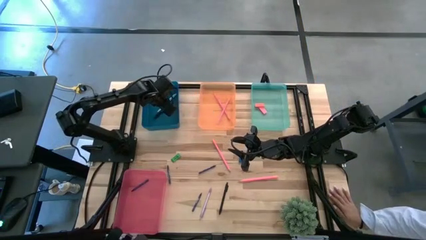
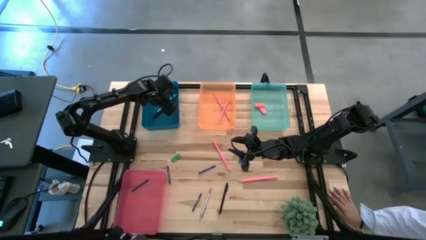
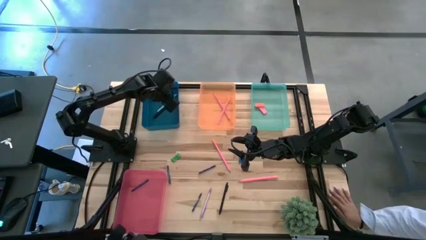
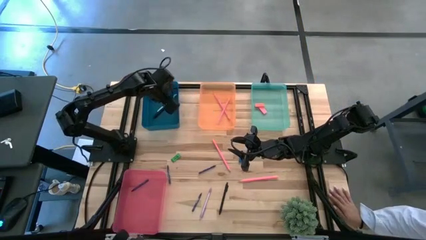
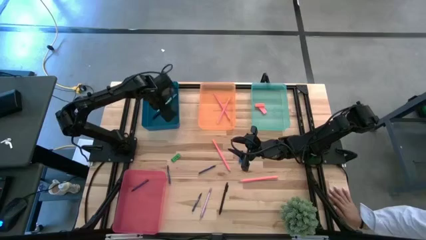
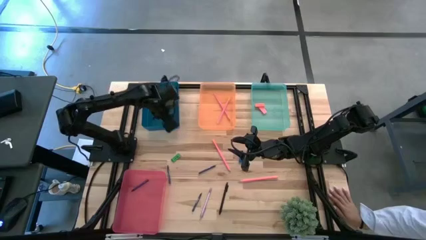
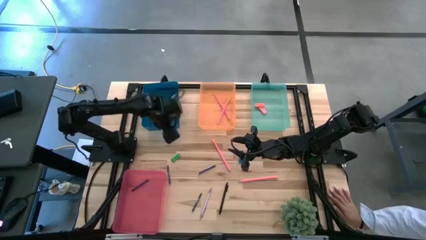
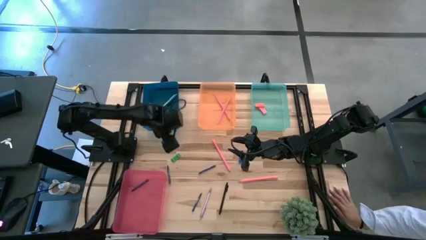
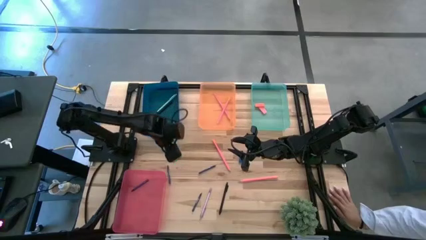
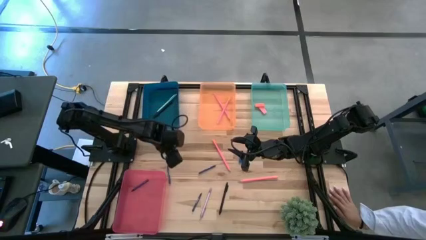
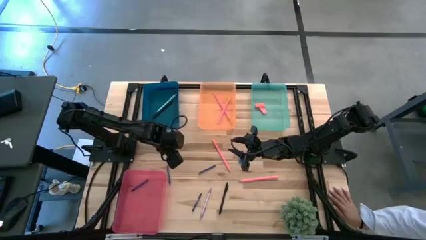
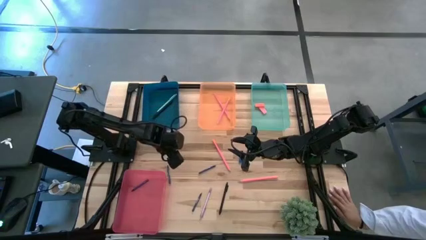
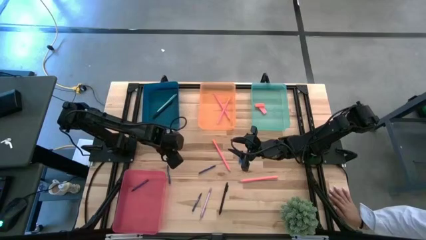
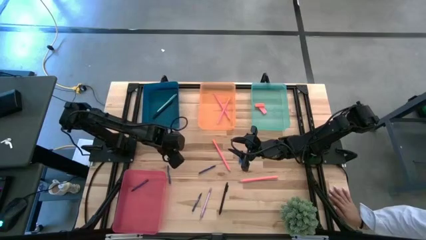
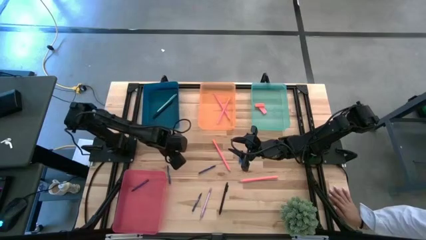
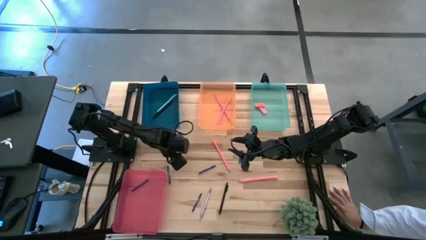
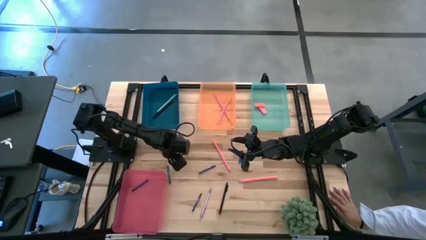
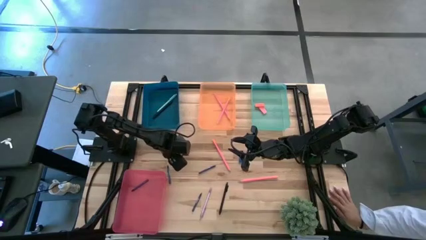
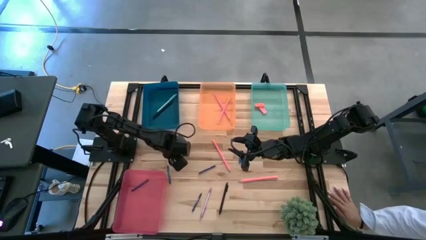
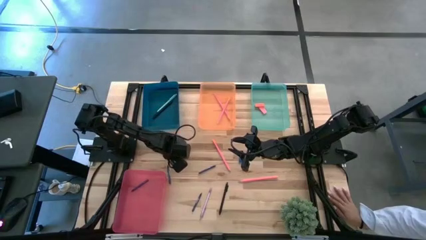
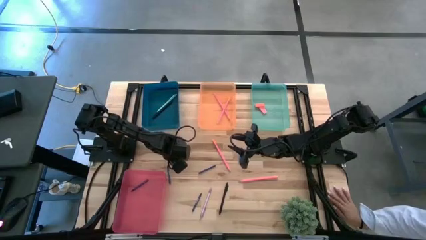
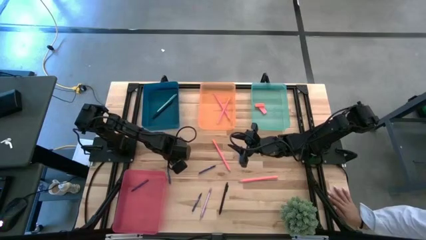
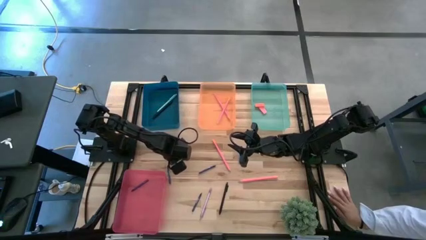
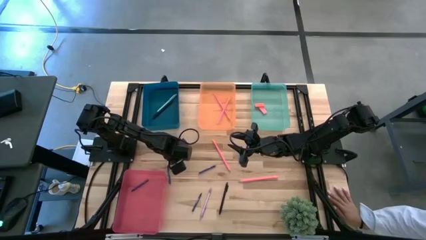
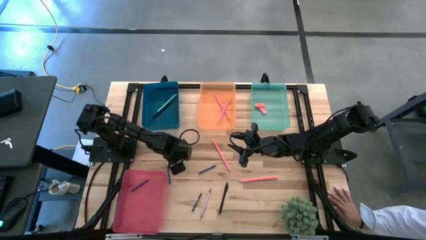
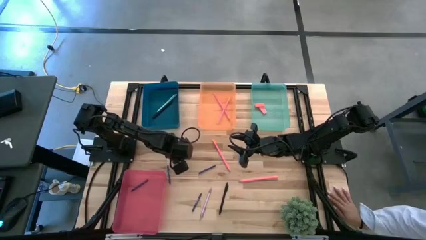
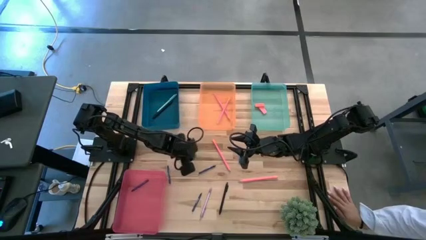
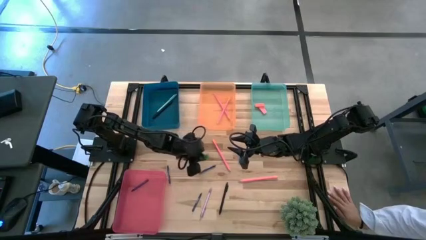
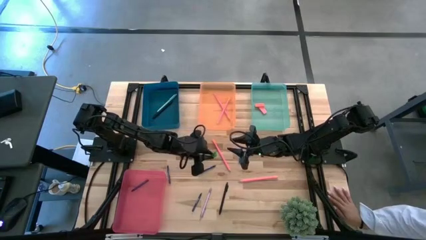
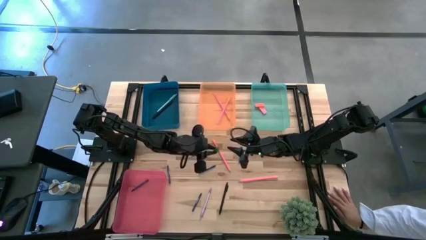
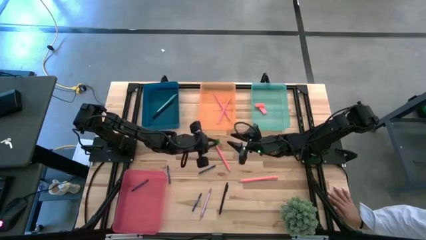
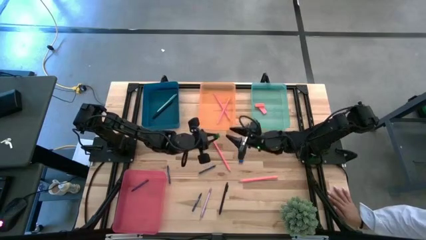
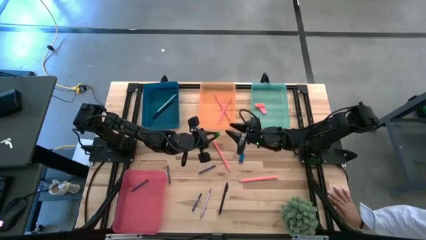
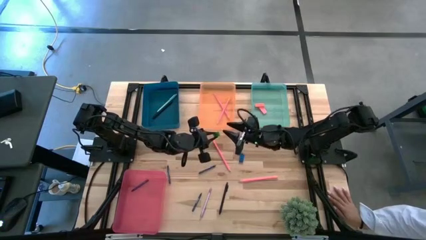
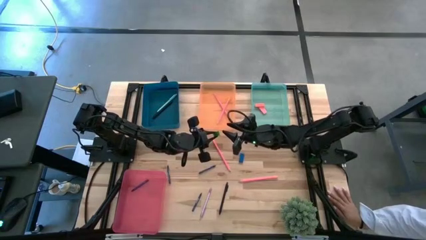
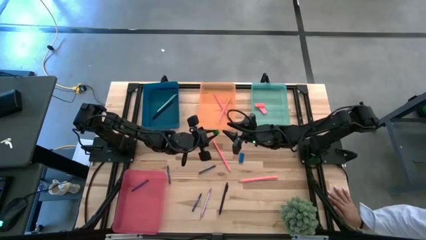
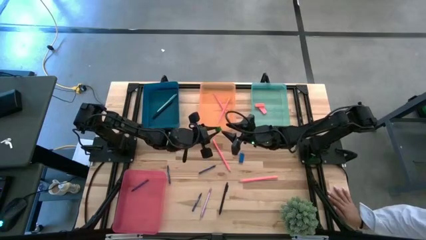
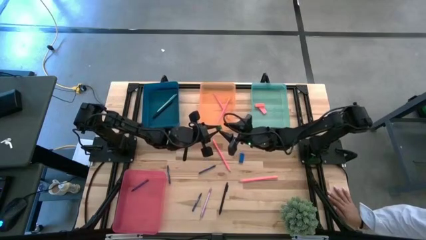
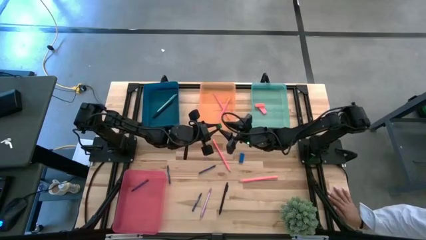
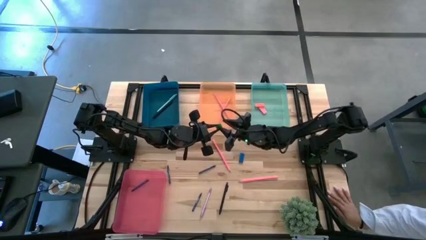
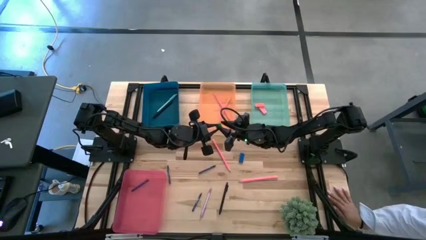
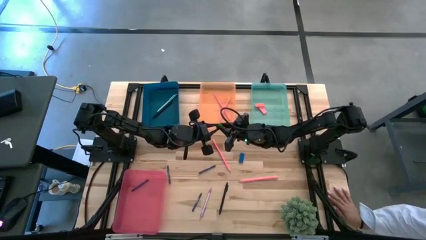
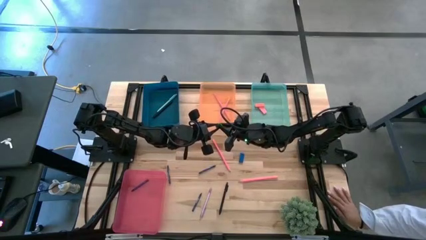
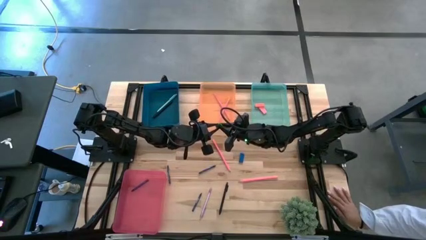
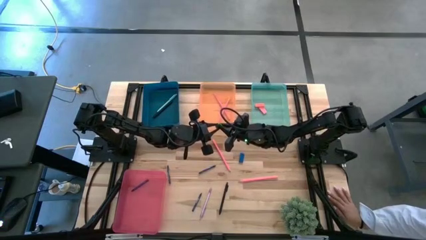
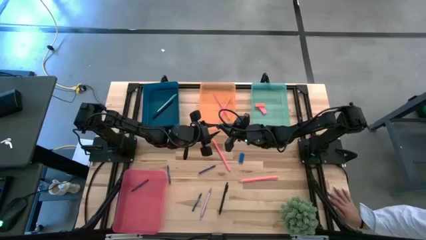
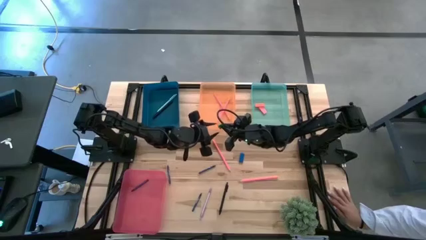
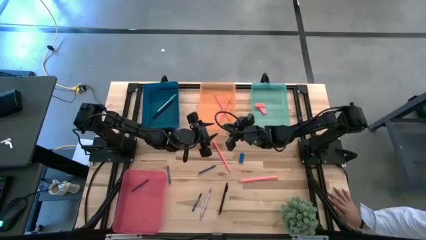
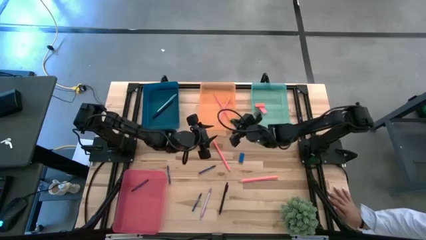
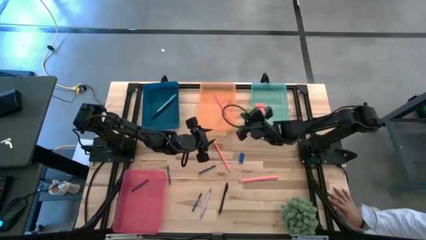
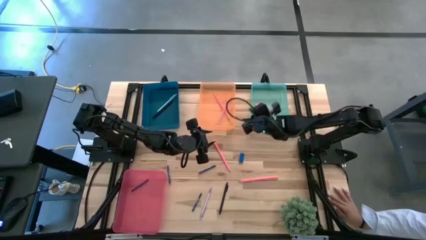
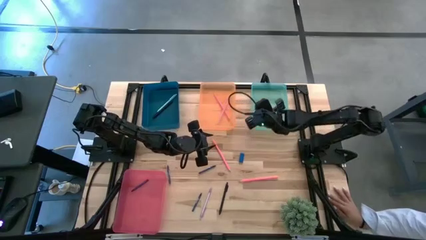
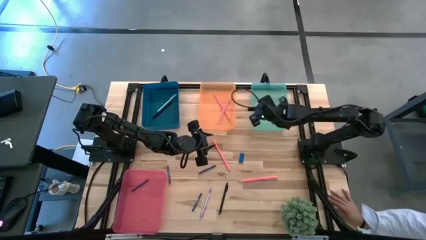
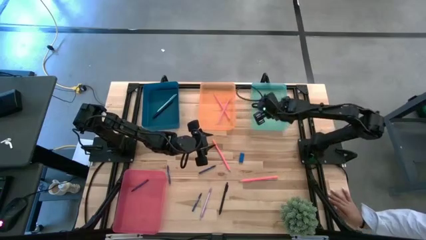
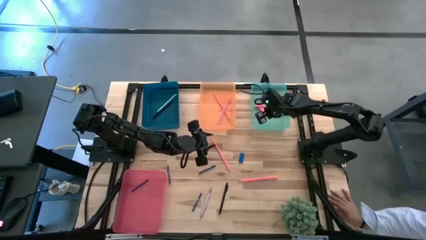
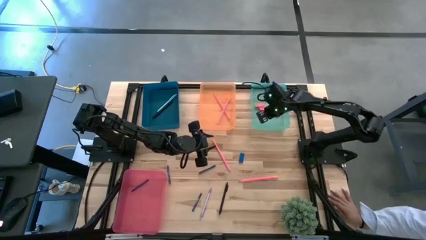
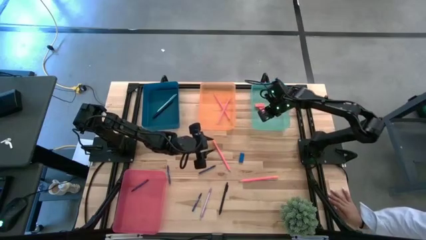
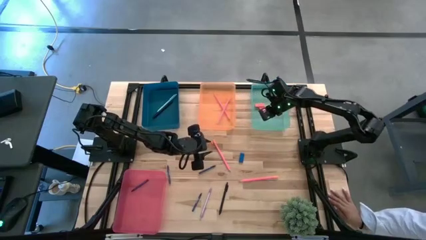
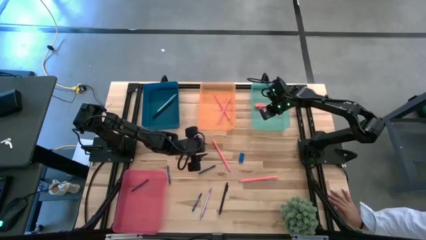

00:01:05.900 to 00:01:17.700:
Task: Sort crayons/erasers/pens/pencils in bins
Put the green eraser into the green bin

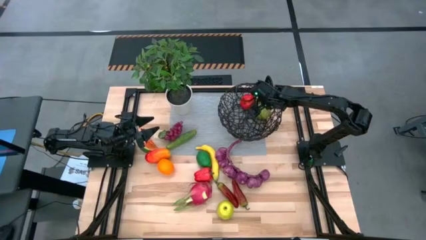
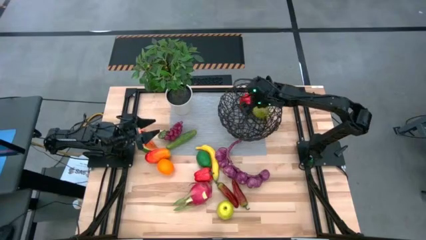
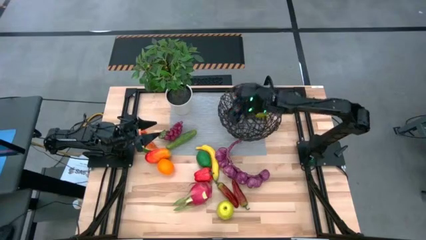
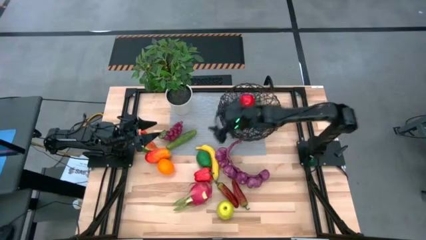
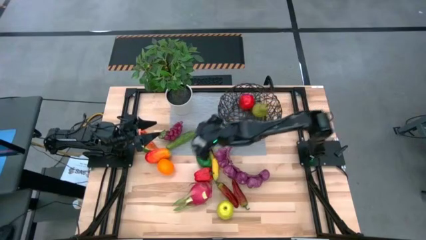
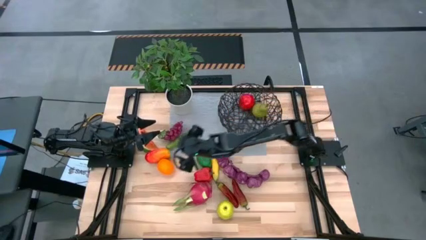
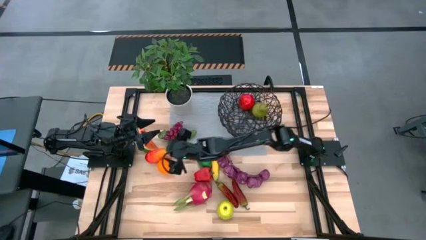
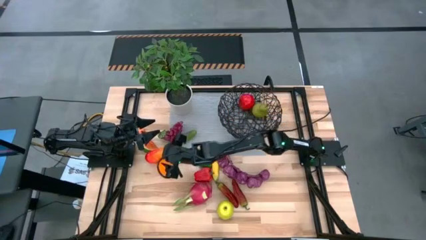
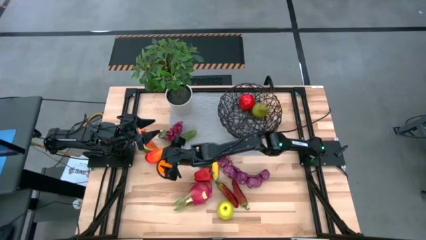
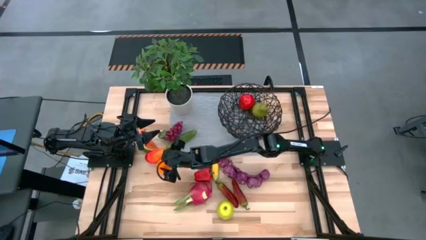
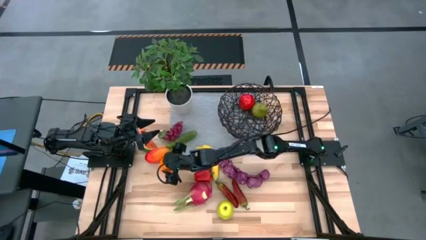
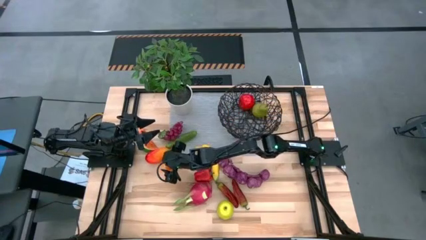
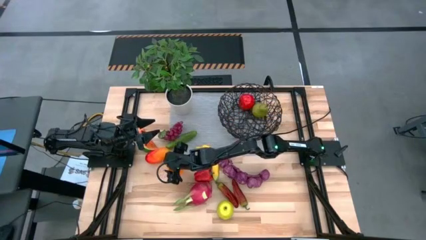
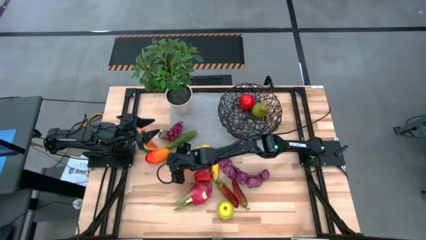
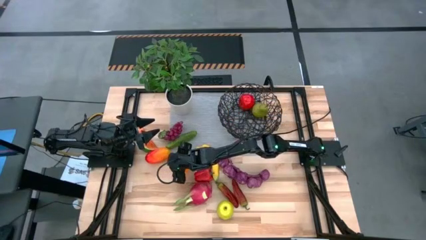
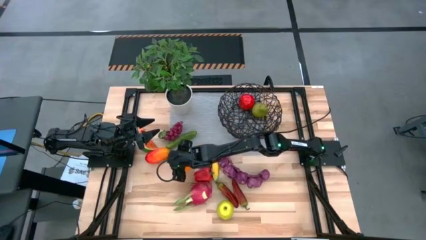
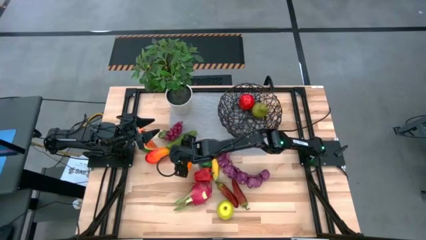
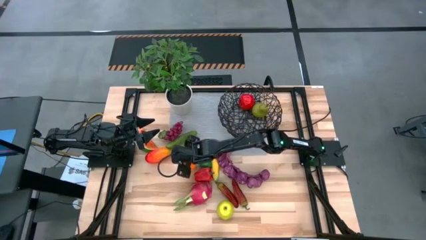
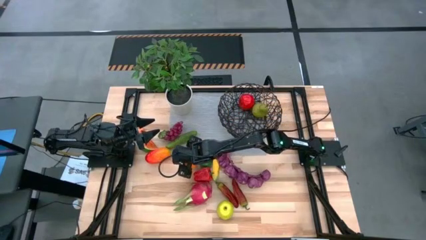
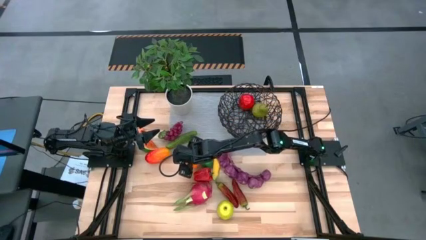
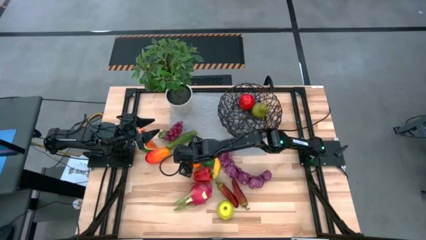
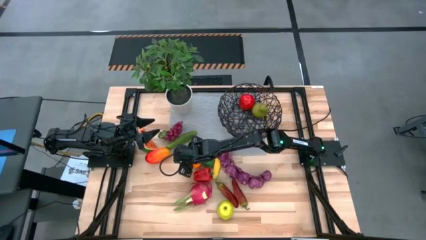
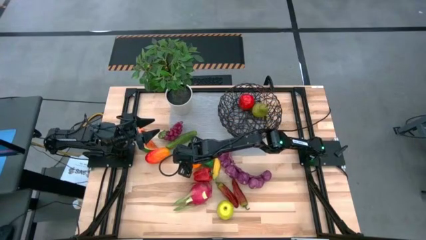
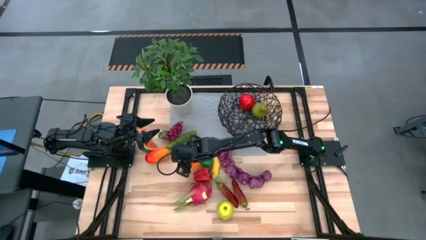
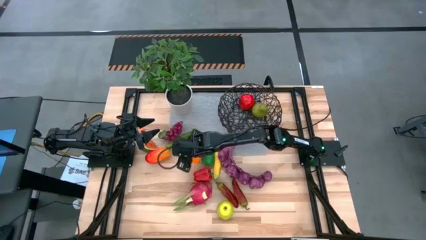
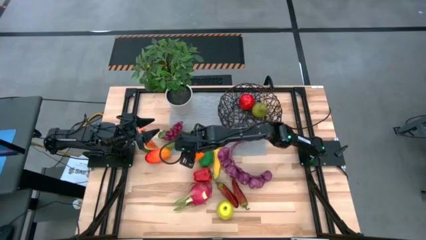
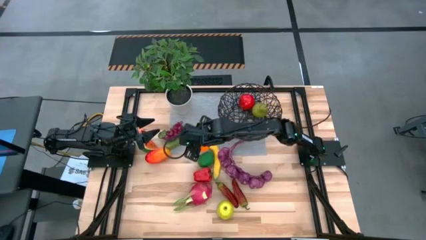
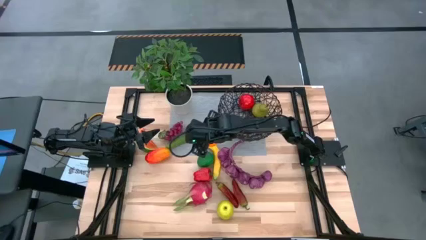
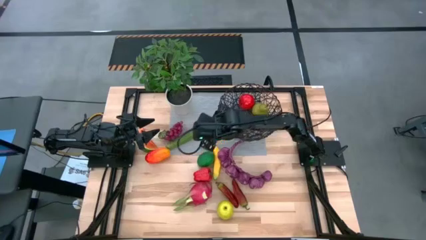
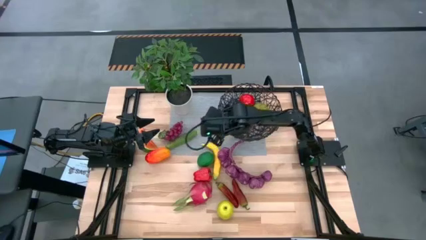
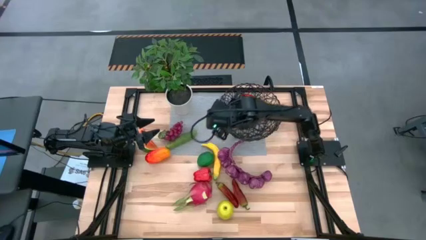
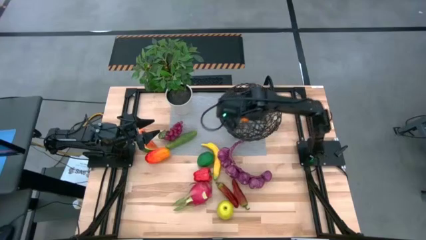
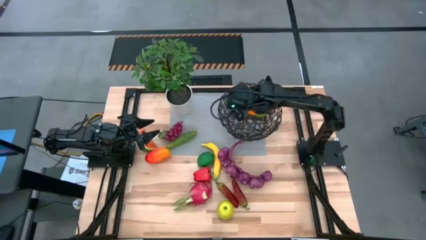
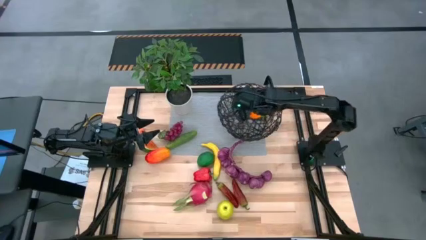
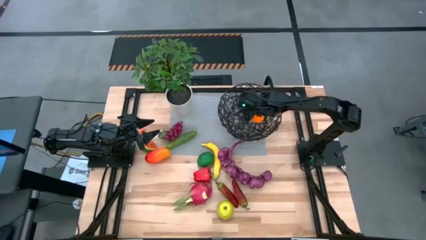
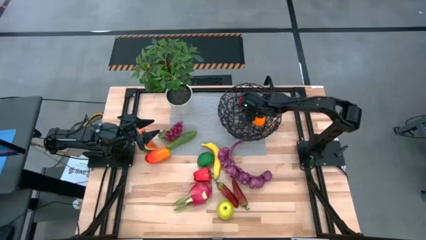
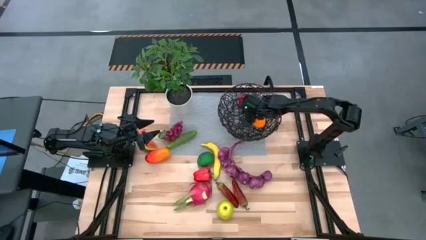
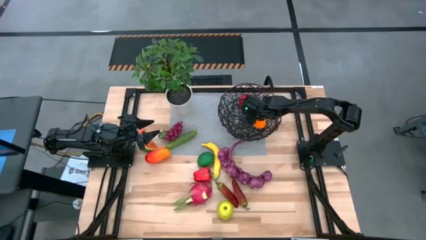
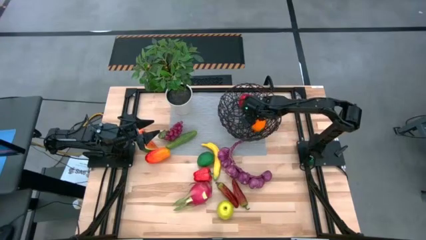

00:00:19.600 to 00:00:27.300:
Task: Build produce basket
Put the orange into the wire basket
